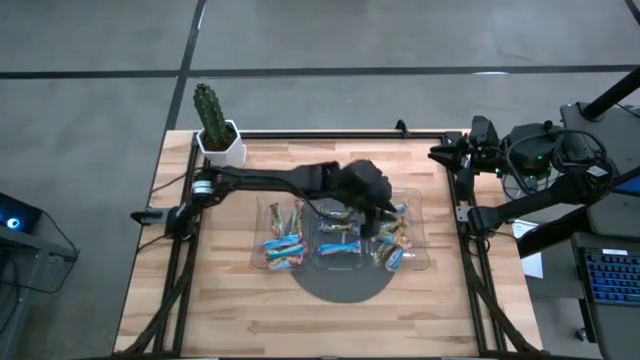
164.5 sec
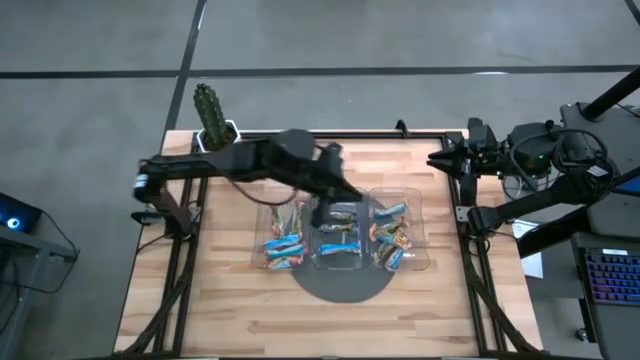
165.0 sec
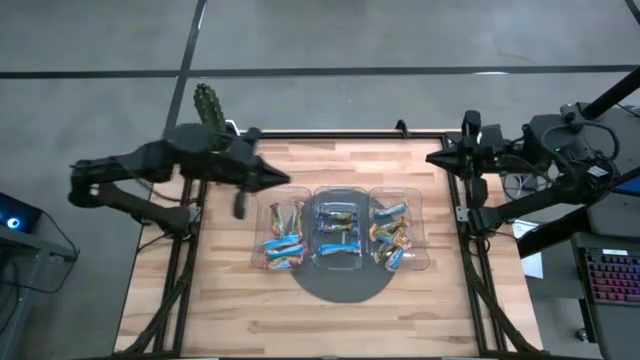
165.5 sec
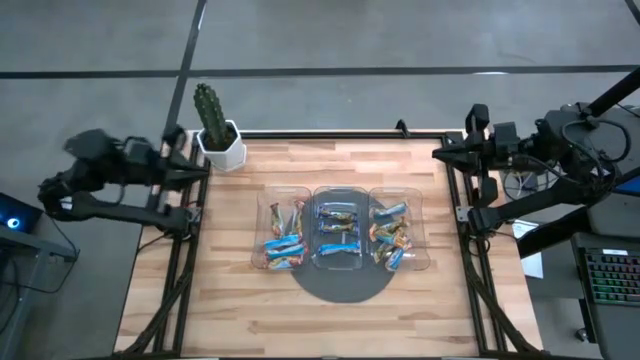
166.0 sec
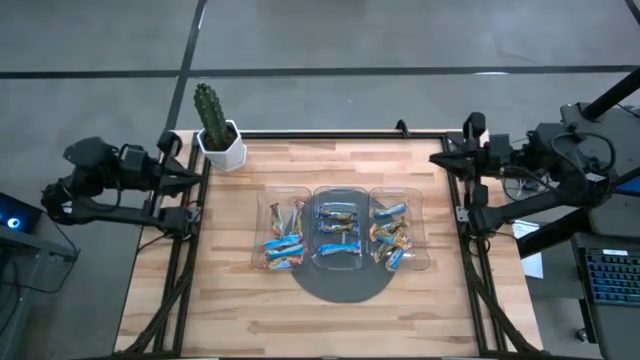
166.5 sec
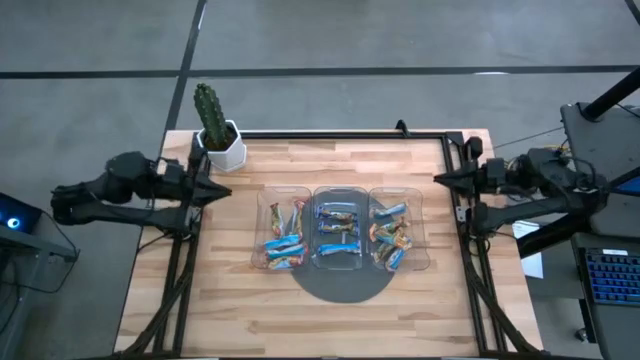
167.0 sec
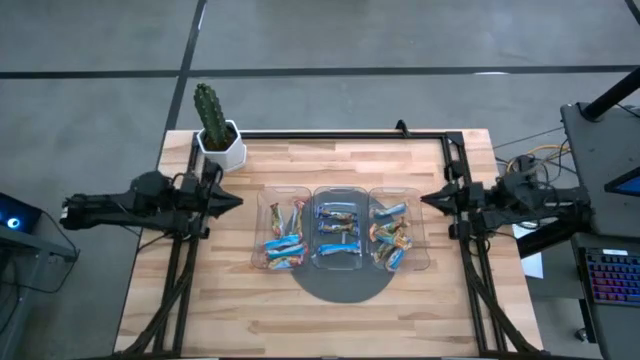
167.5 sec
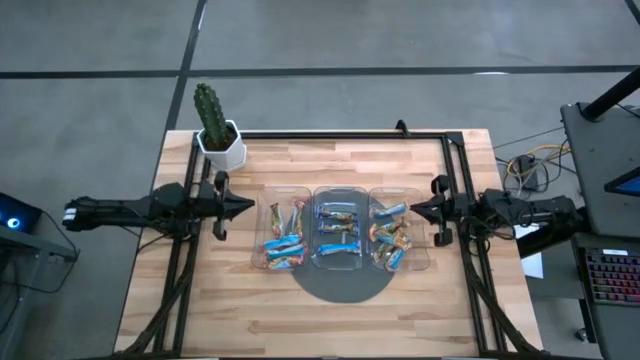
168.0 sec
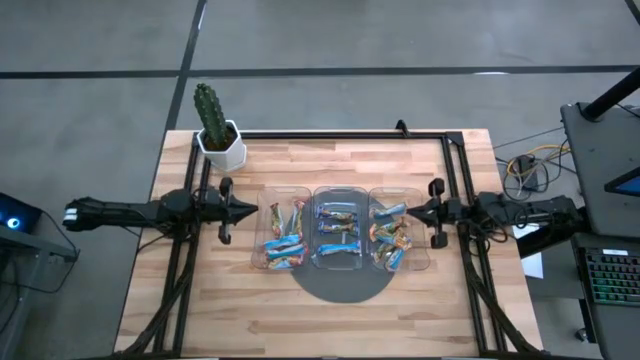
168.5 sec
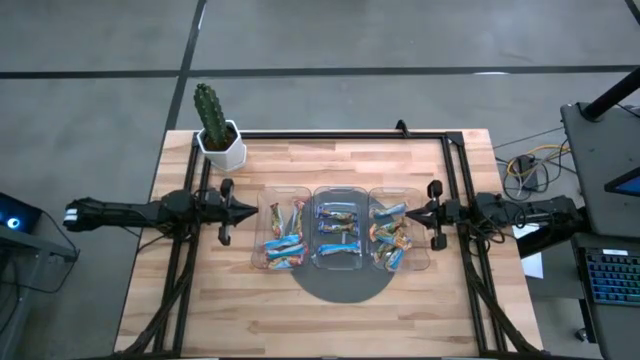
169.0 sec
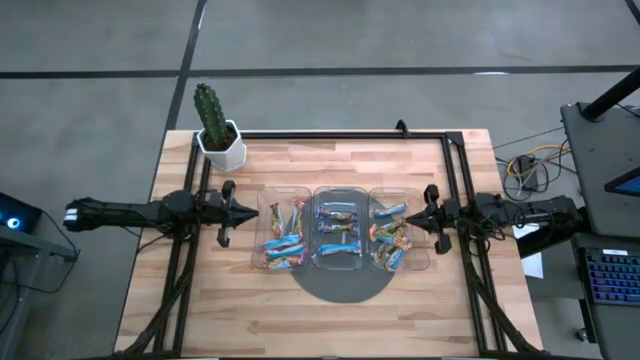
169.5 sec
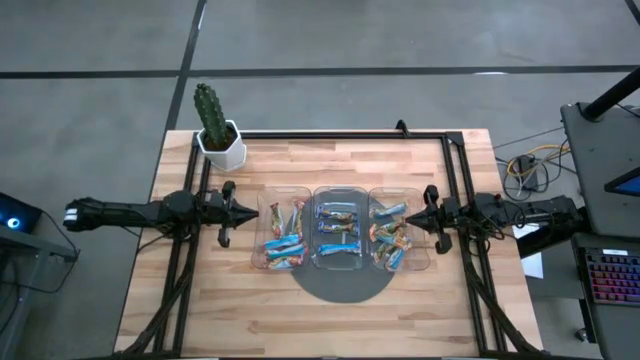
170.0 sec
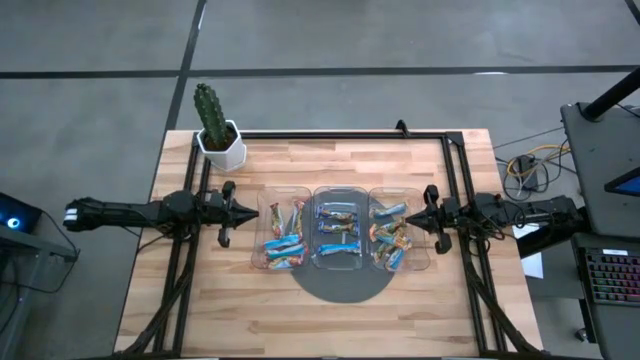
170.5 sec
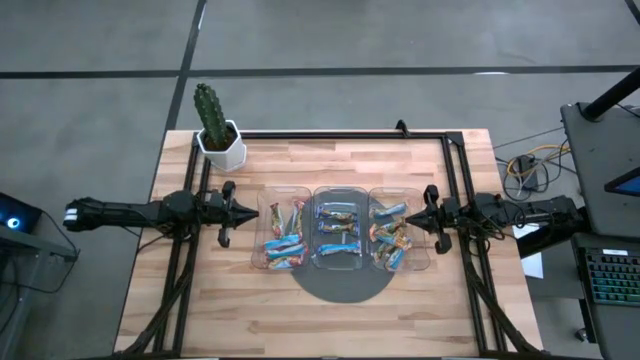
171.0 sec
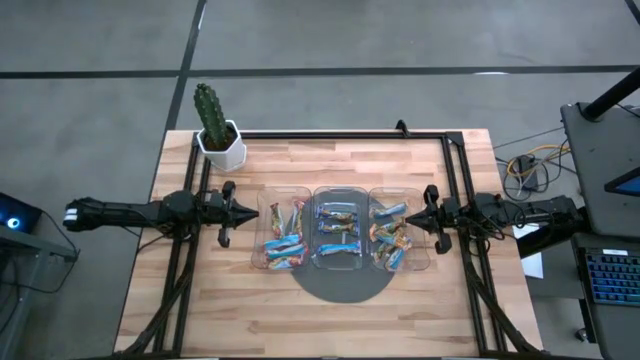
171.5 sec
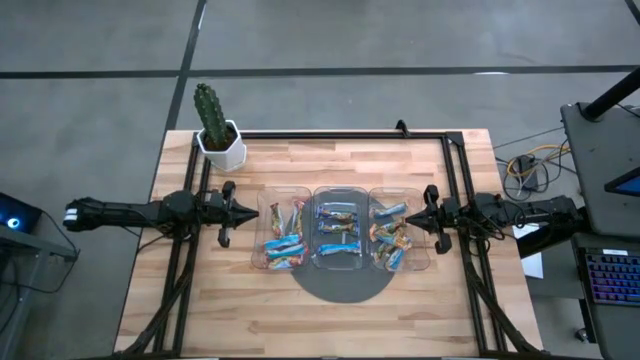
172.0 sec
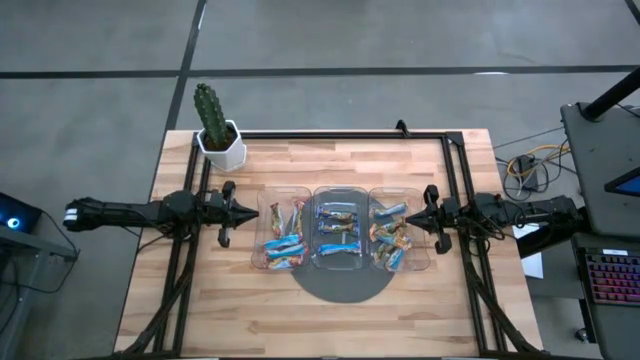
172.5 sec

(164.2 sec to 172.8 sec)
Task: Pick and place Granola Bars by type
Return to Home Position

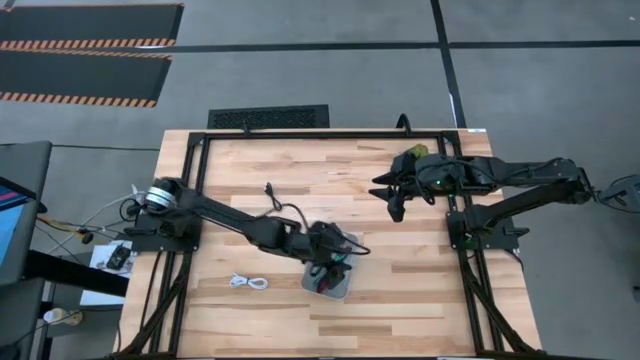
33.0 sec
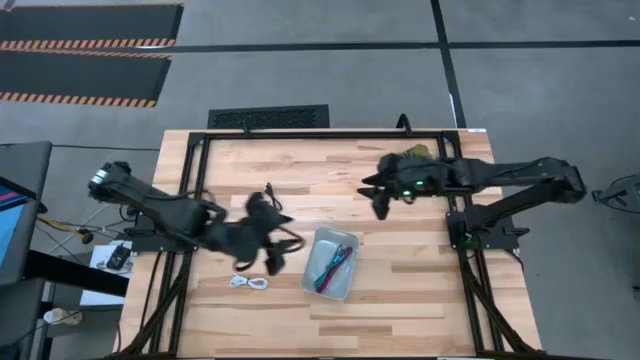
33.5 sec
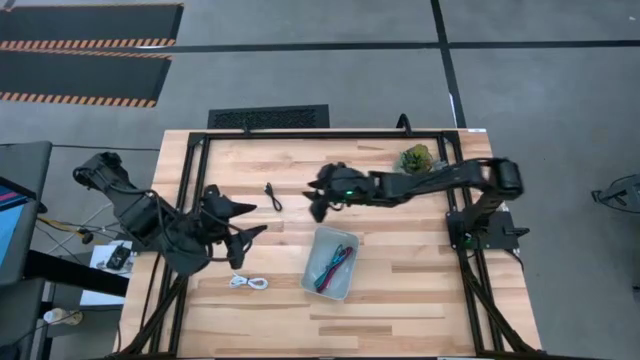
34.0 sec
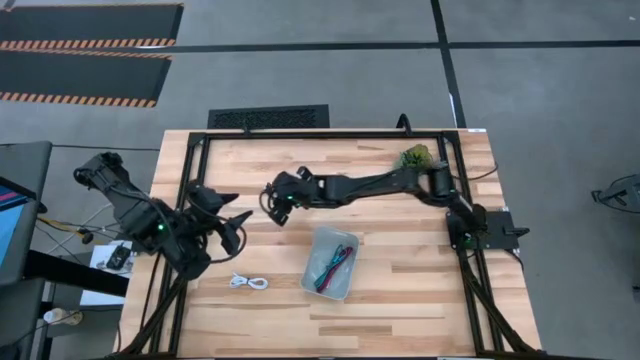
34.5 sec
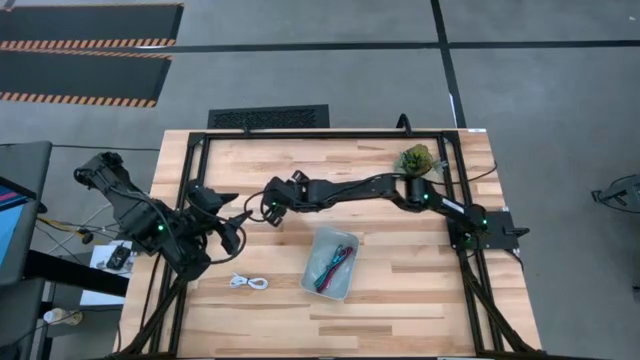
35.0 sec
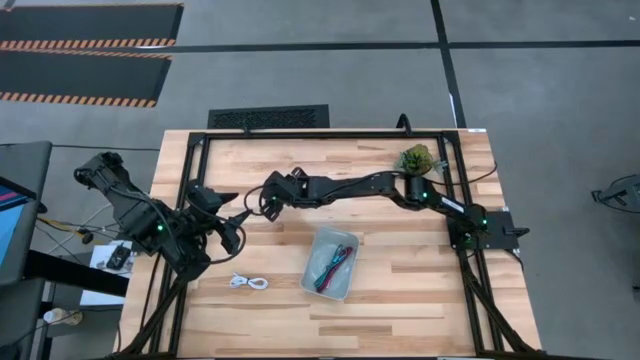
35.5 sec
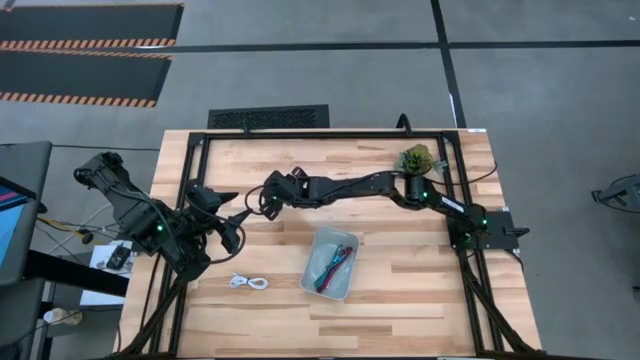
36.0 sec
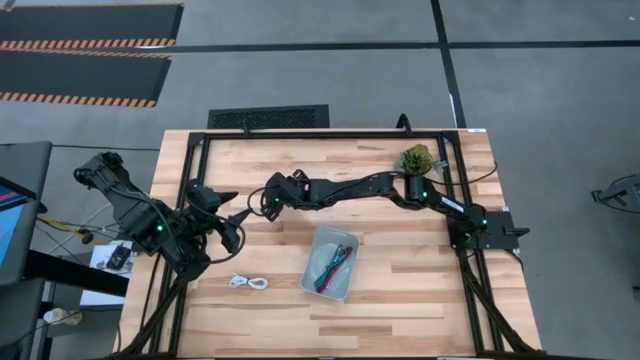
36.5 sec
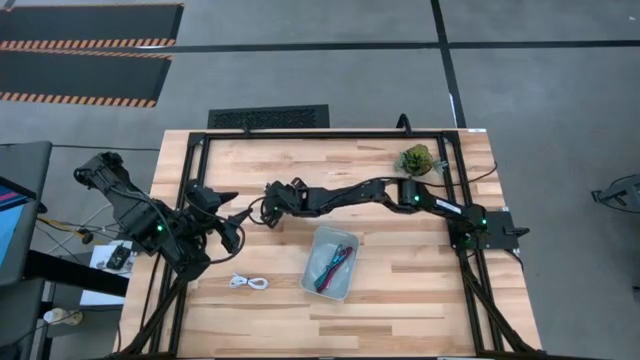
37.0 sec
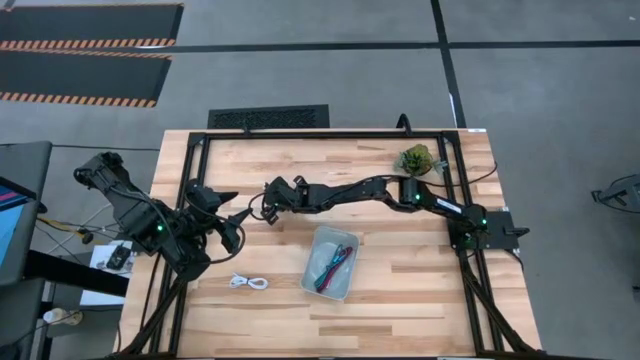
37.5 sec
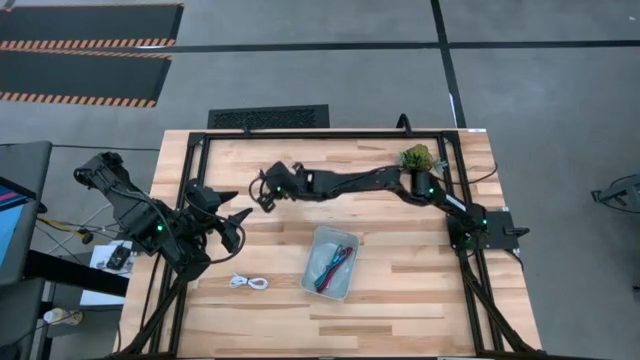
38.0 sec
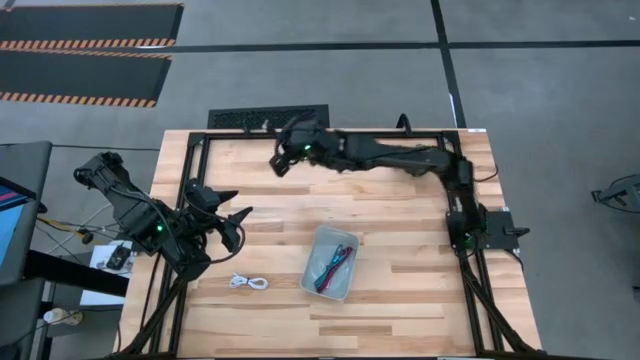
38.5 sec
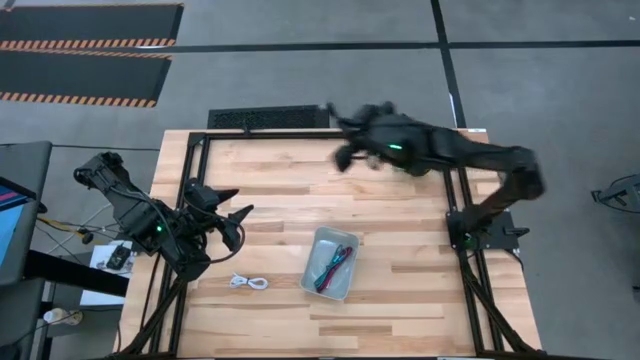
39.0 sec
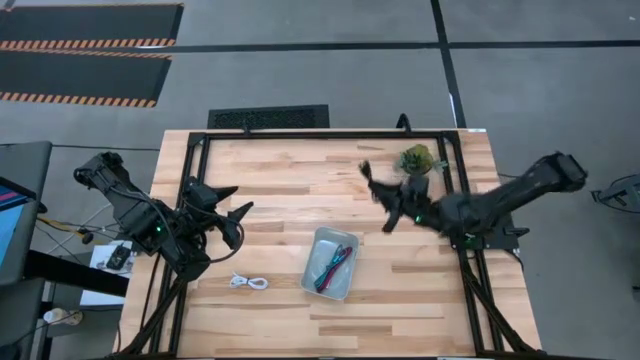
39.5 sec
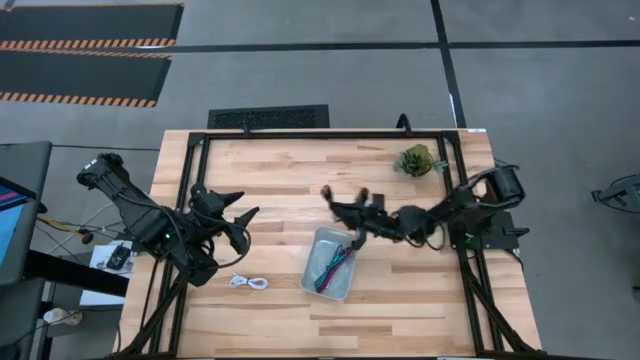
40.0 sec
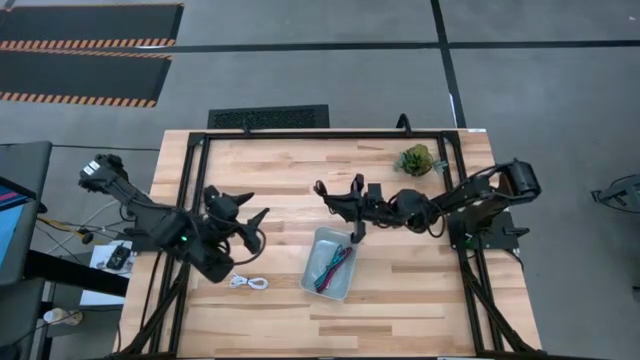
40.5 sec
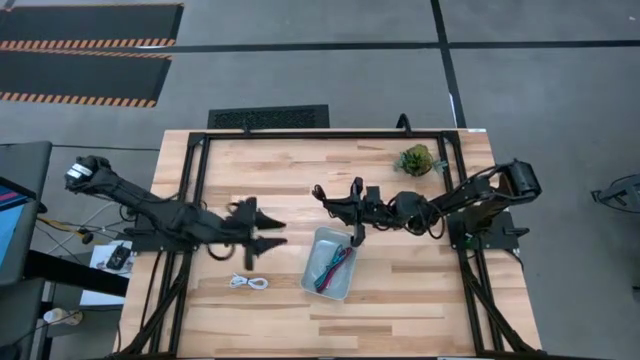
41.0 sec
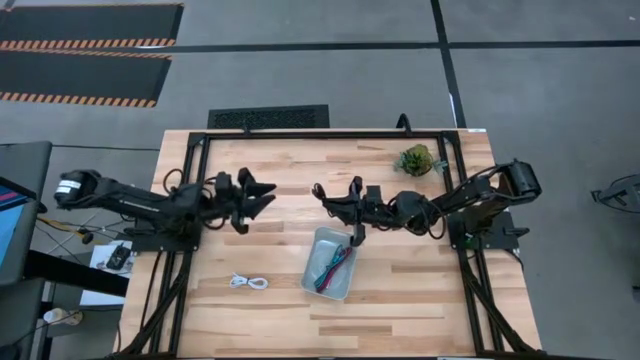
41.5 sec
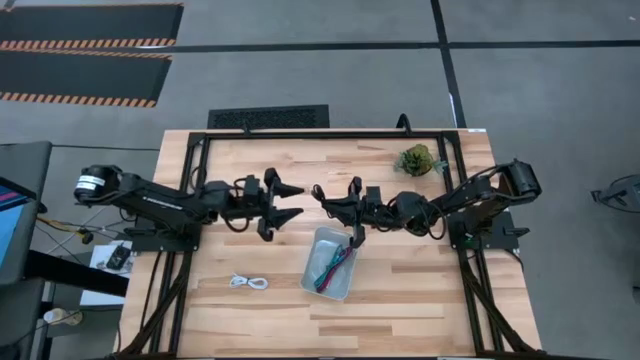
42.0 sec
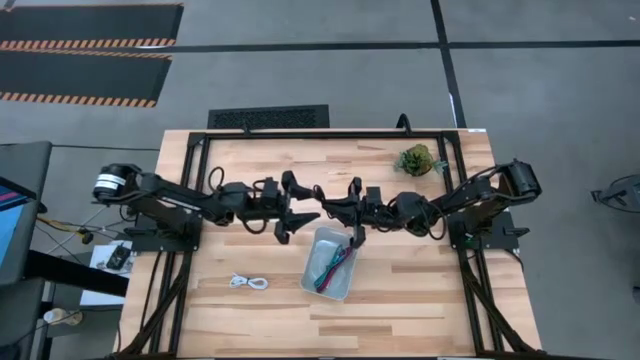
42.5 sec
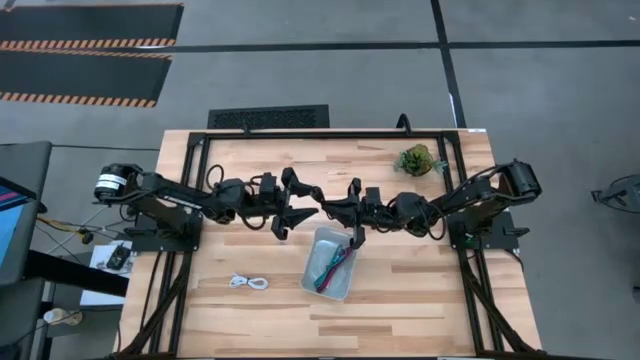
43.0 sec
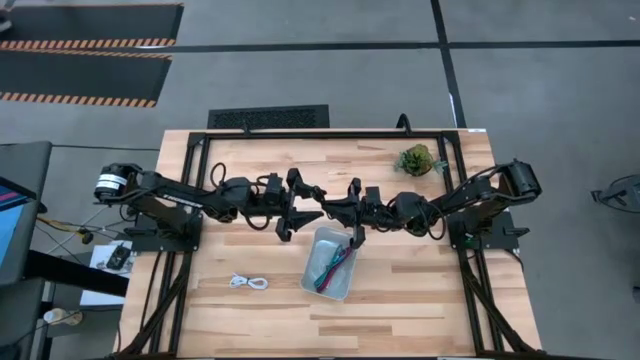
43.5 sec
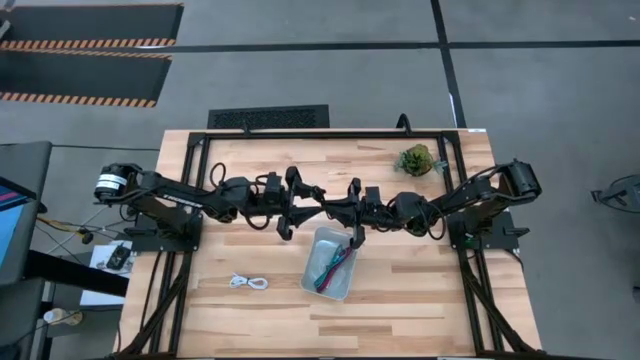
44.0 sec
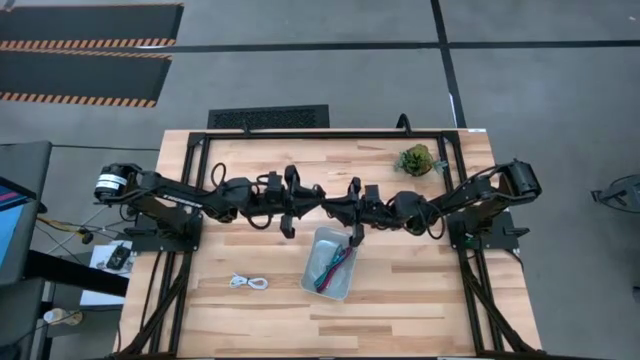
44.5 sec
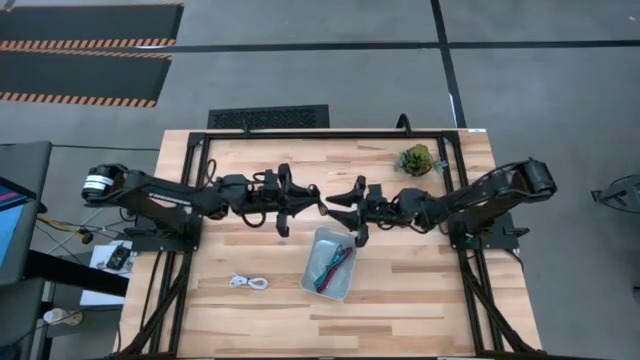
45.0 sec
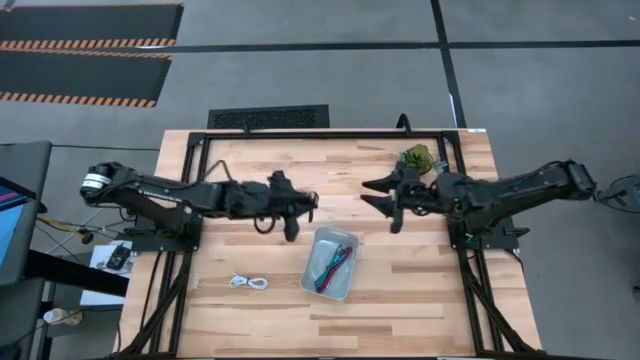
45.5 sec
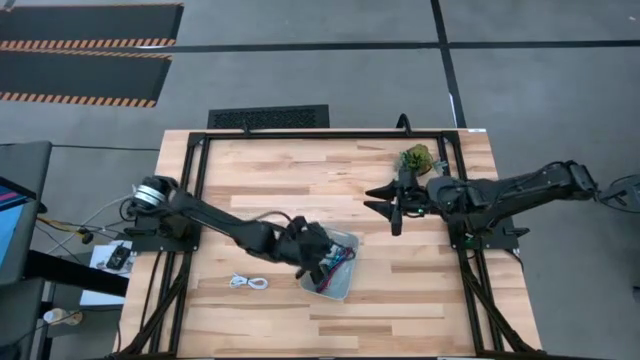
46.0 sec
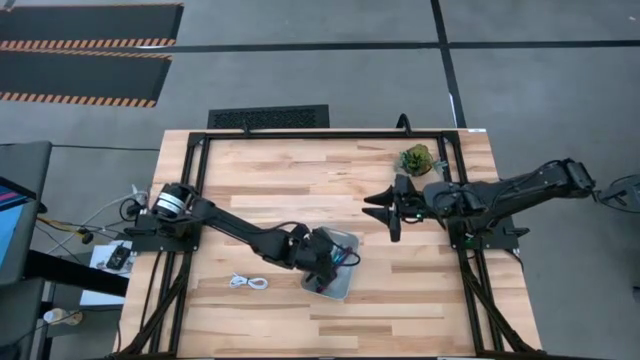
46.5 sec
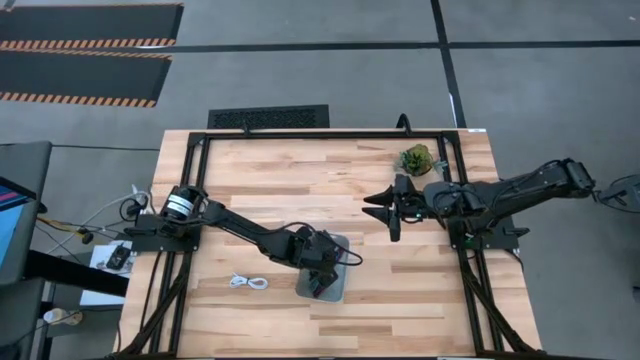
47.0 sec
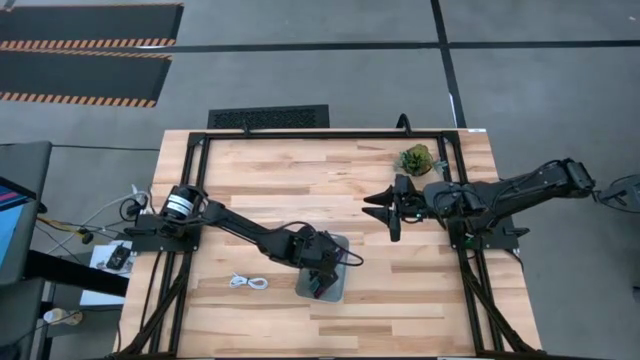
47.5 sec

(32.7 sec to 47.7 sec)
Task: Pick and place USB-C Cables
Put the black charger cable into the gray bin
